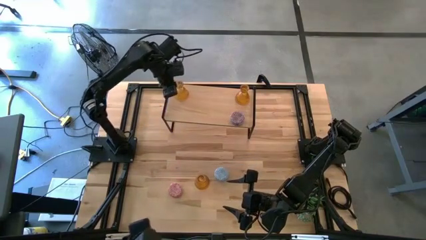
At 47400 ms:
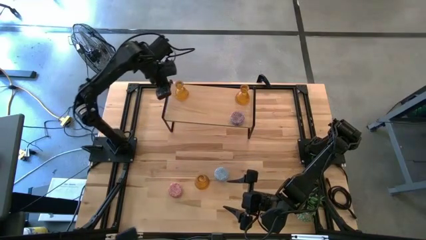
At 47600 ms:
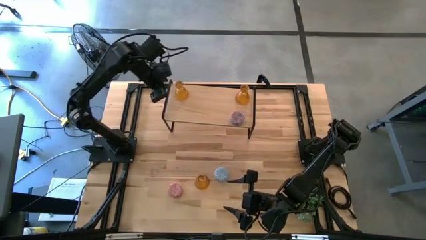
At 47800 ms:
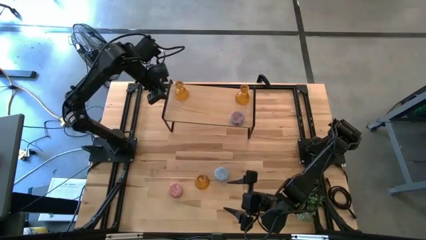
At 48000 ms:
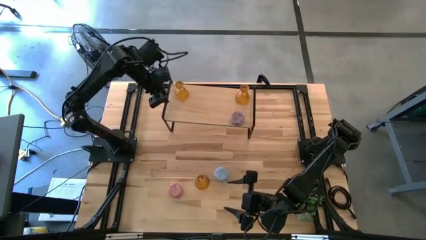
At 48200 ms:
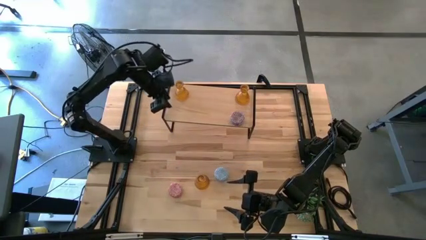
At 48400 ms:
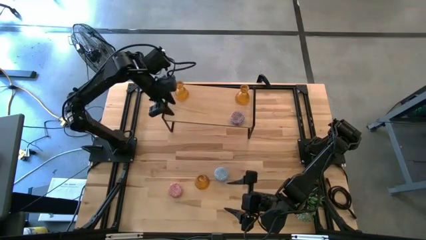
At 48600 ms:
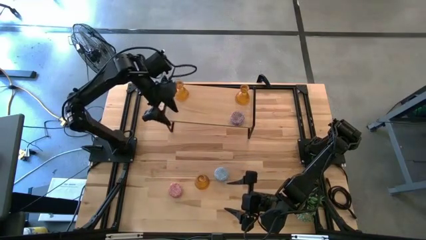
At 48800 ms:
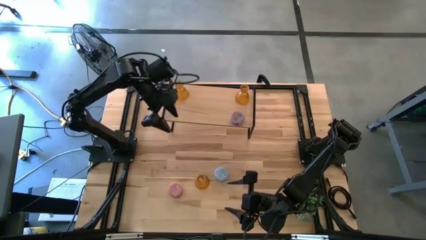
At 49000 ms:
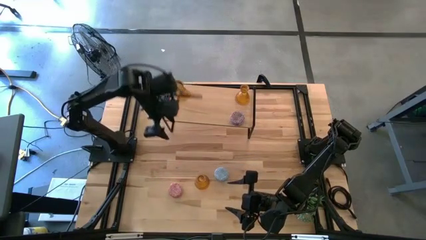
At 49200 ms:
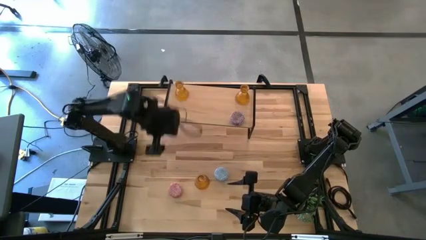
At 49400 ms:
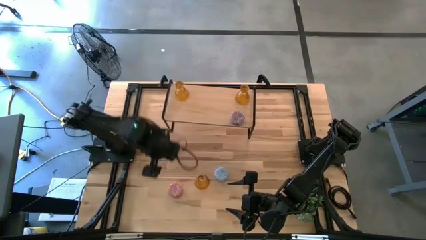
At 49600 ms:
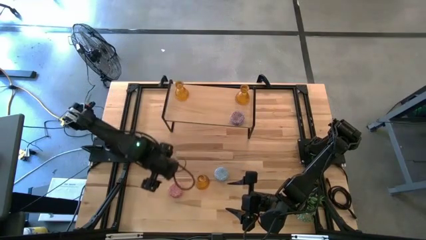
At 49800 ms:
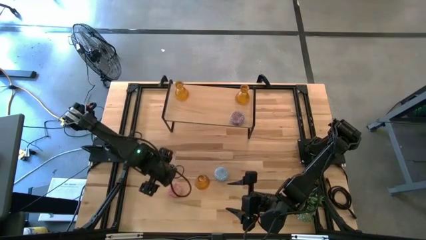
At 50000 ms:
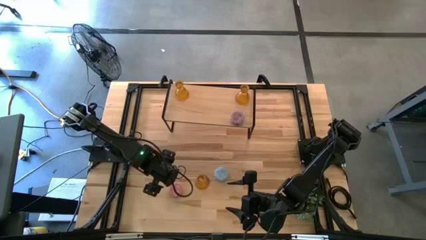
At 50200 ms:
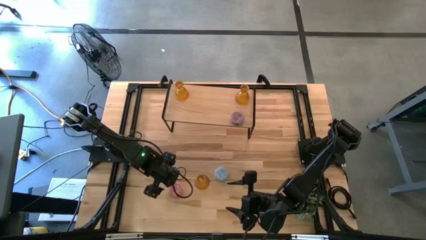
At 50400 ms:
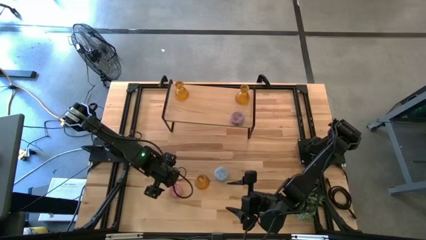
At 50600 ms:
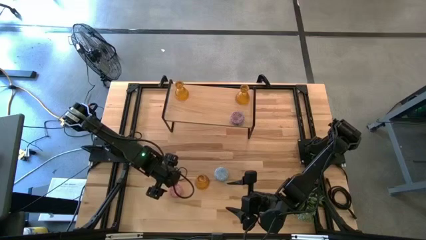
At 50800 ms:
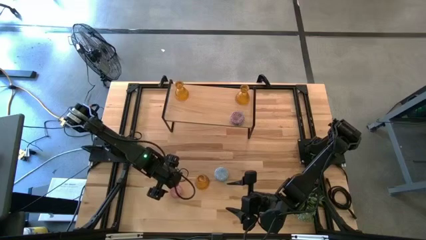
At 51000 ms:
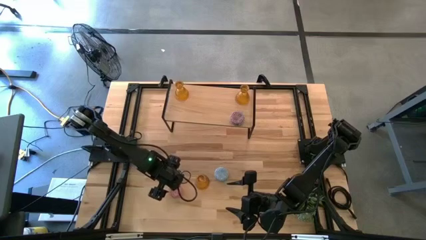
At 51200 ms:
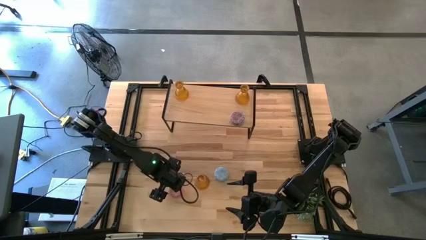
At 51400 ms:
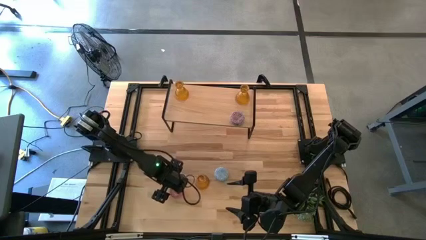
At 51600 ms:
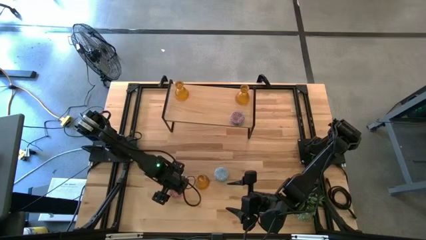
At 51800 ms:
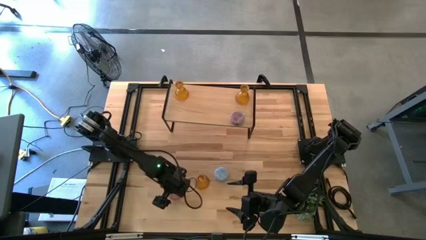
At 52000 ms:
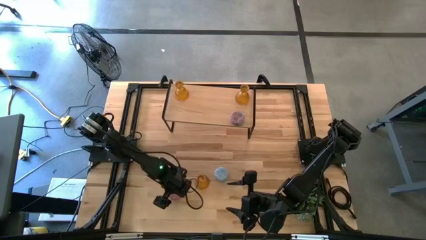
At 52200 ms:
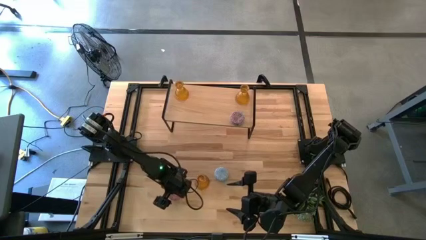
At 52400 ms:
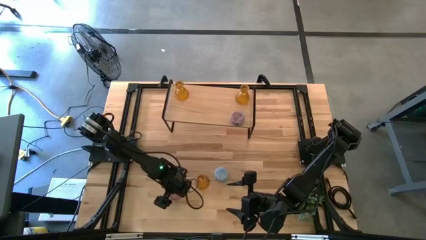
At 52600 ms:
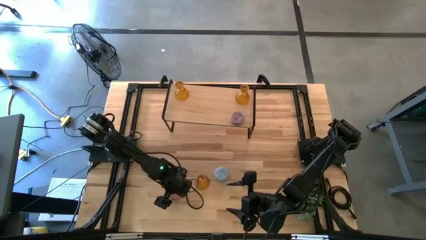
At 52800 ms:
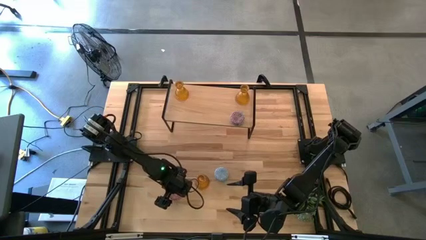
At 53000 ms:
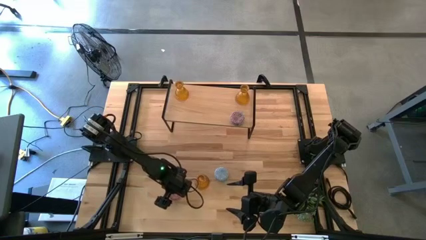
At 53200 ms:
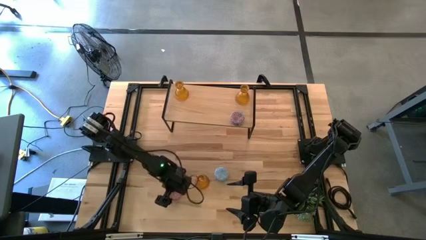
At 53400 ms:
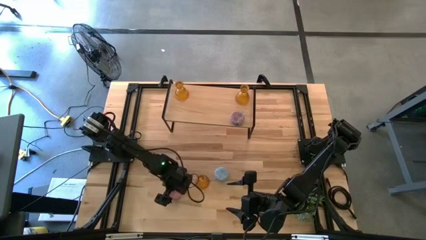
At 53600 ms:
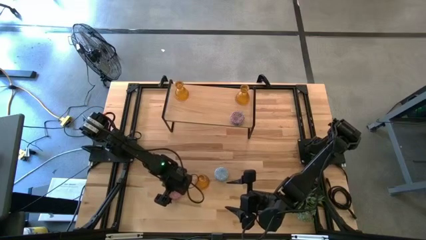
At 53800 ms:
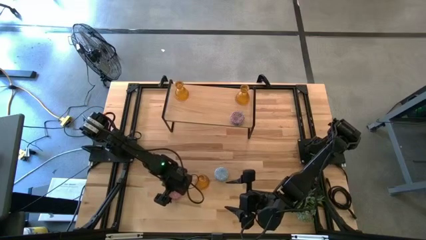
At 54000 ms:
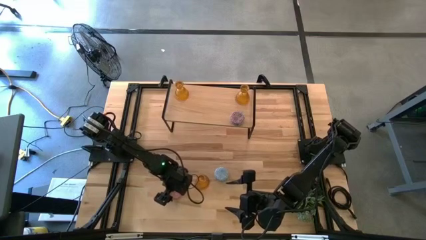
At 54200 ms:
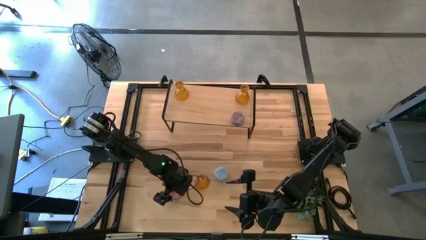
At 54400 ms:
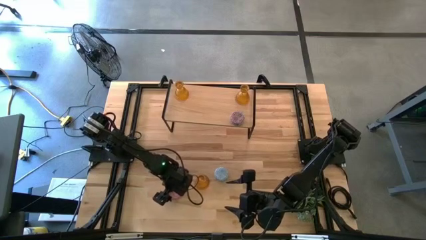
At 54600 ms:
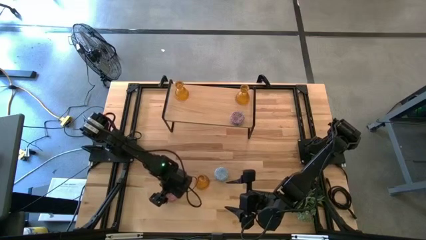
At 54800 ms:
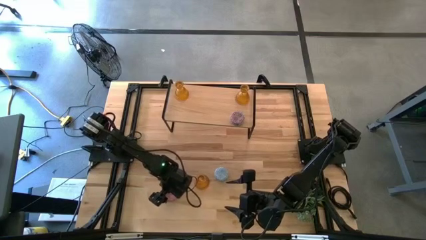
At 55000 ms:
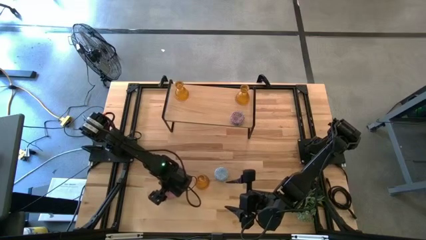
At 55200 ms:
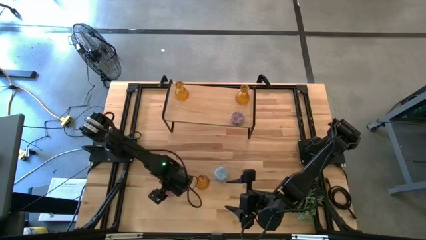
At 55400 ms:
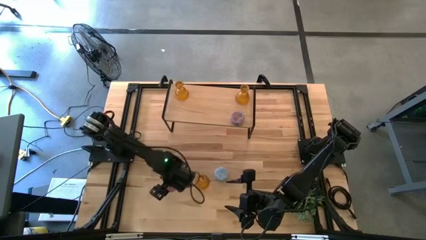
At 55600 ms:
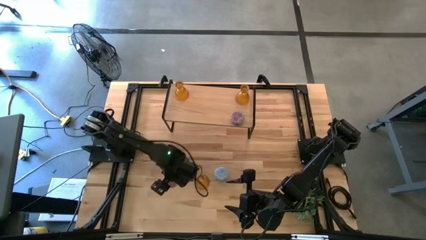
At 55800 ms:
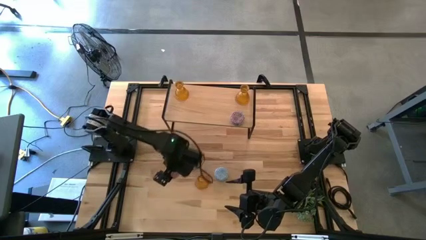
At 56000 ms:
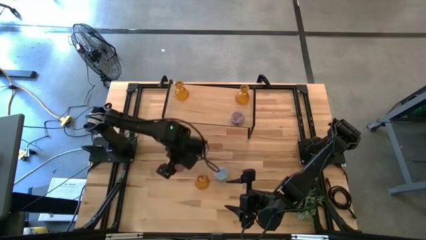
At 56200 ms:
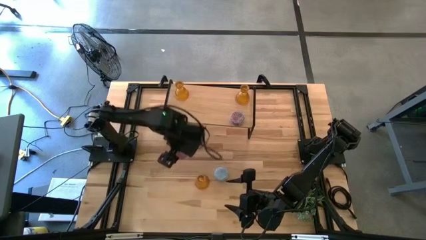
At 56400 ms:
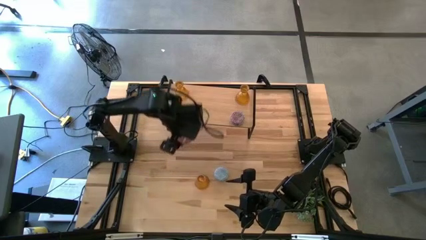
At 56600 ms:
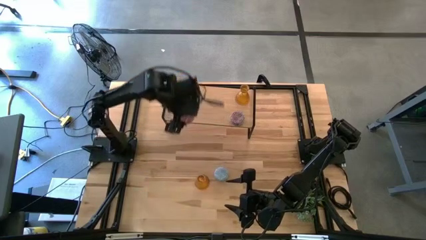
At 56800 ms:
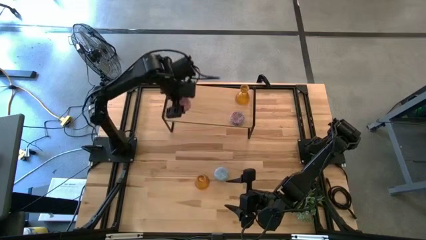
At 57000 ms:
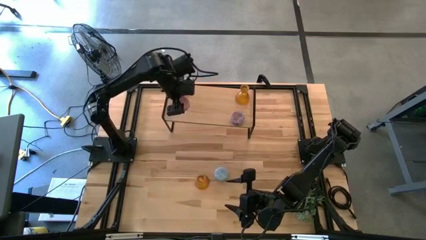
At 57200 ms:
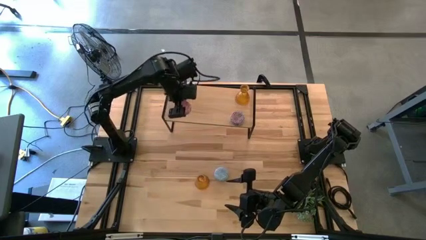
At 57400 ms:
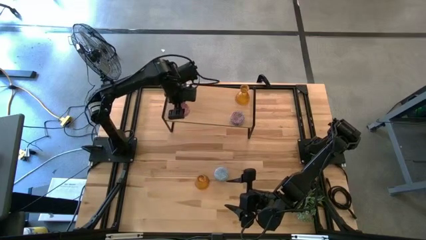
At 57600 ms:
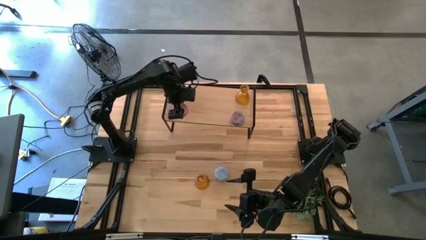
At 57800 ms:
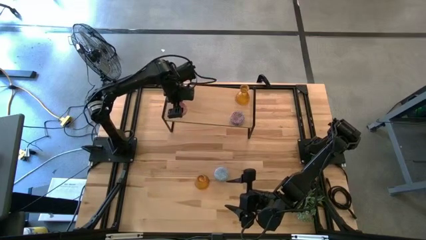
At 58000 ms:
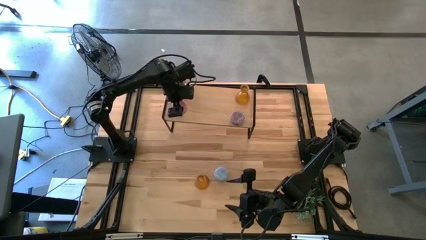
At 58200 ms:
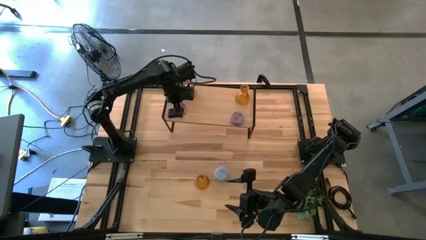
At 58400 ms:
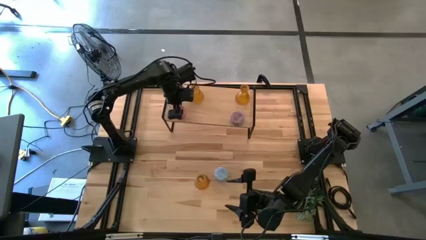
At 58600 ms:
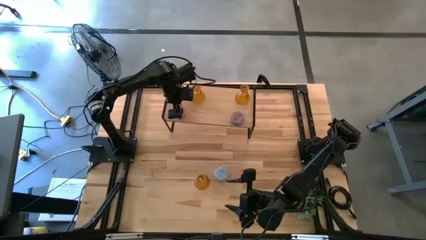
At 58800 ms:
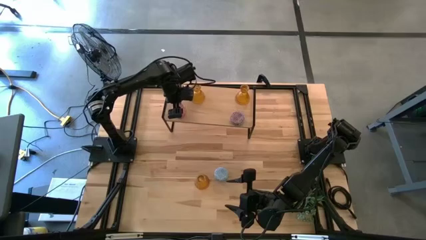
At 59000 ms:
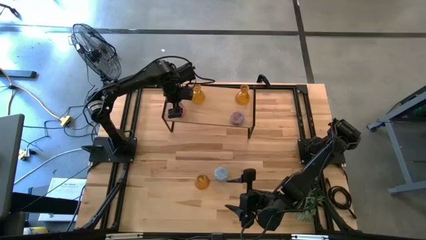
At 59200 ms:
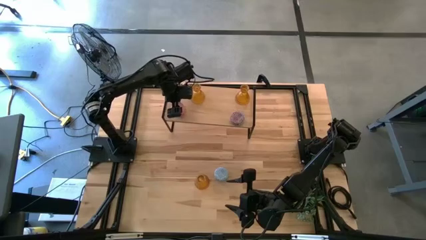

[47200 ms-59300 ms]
Task: Pick & Place candle stick holders
Put the pink scented candle on the shelf aligned with the other scented candle
